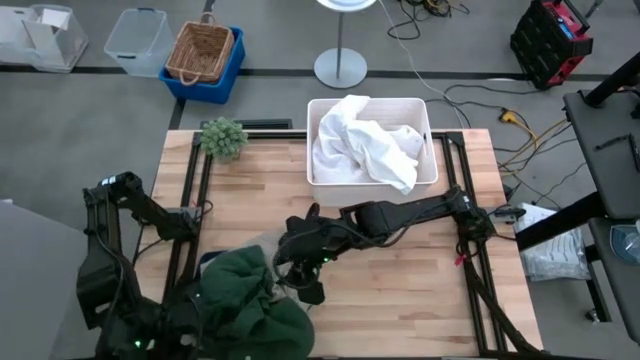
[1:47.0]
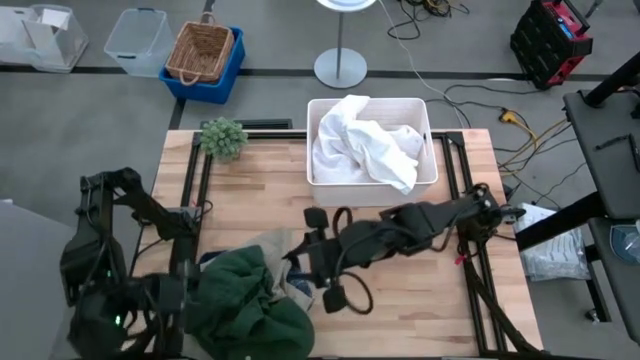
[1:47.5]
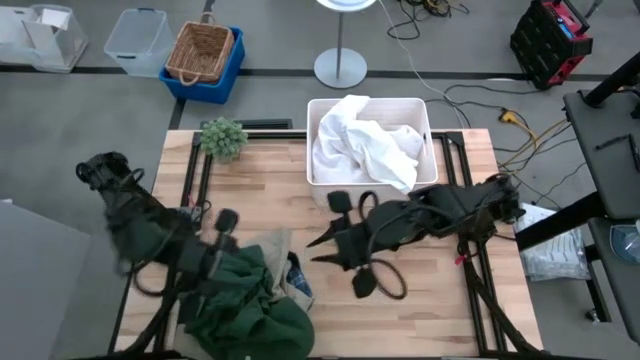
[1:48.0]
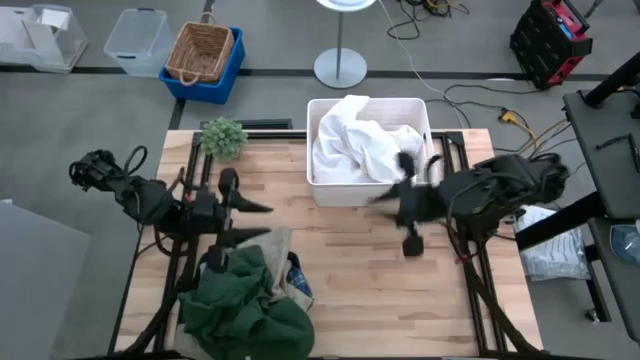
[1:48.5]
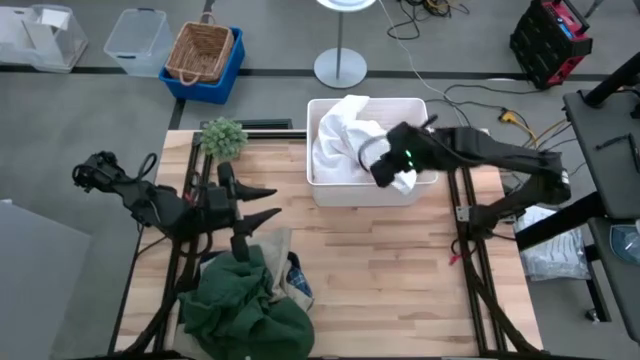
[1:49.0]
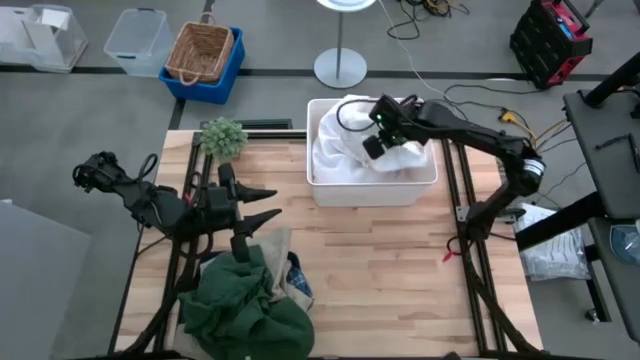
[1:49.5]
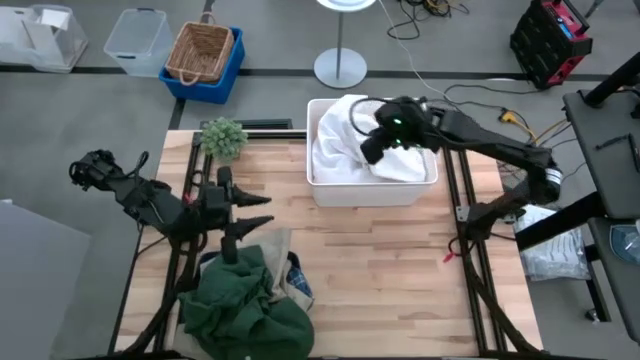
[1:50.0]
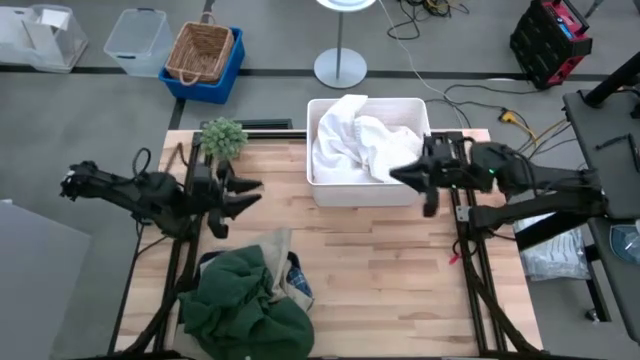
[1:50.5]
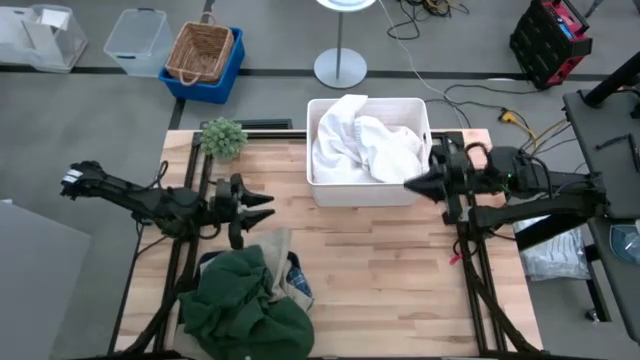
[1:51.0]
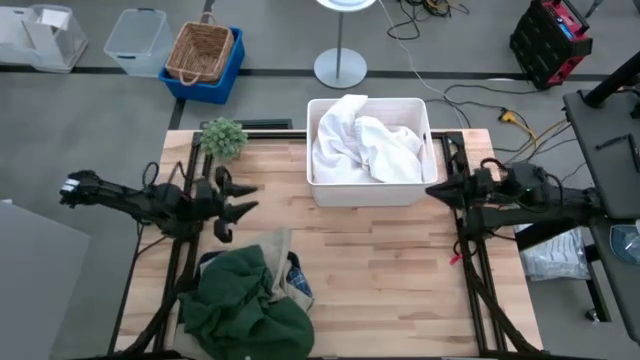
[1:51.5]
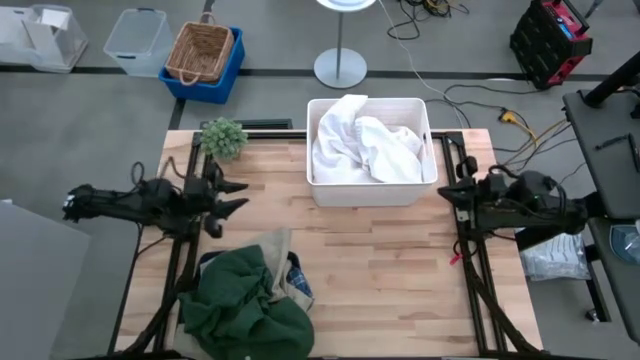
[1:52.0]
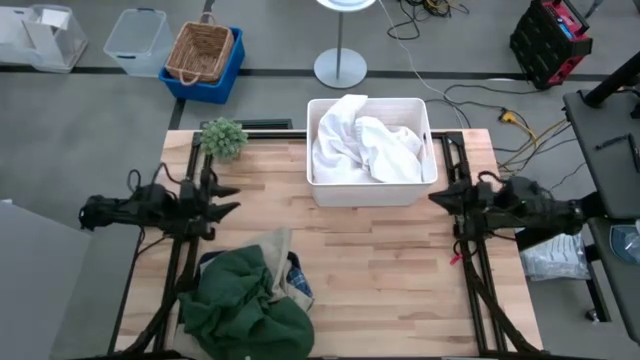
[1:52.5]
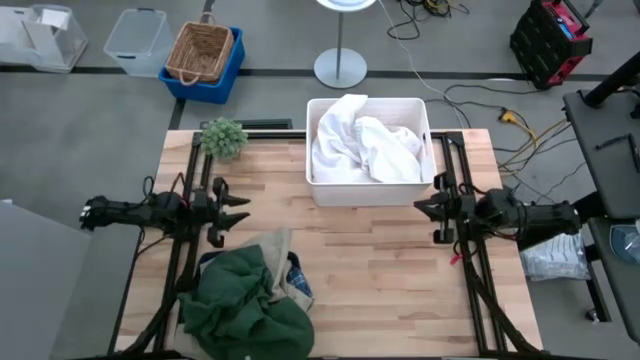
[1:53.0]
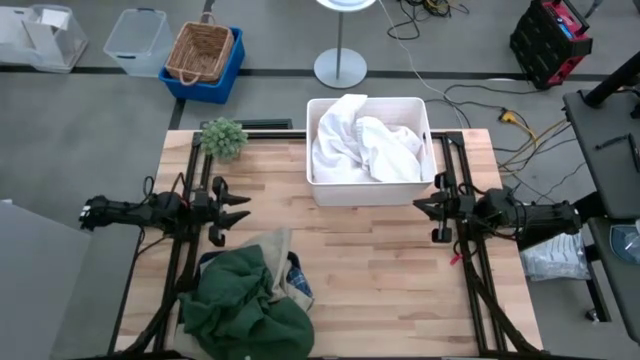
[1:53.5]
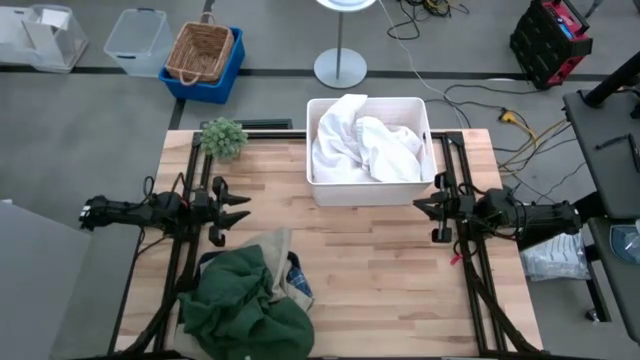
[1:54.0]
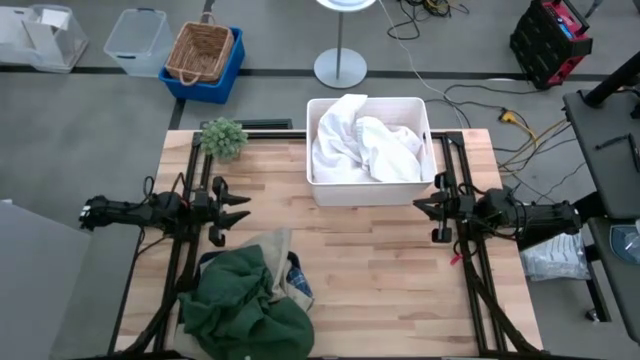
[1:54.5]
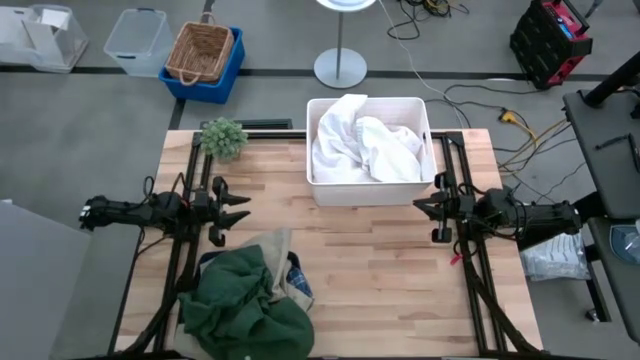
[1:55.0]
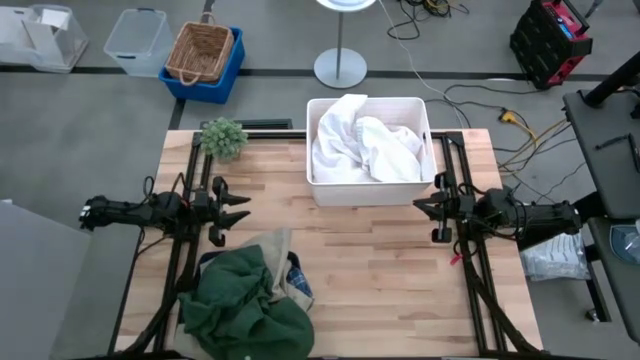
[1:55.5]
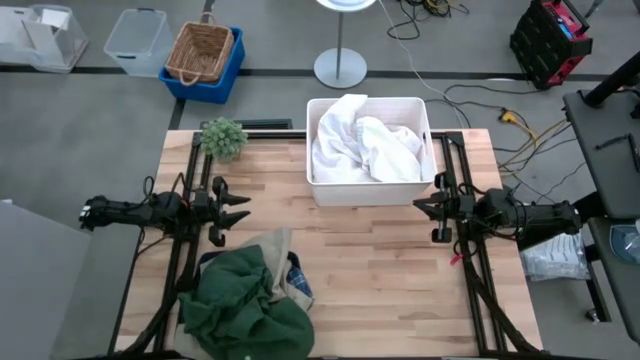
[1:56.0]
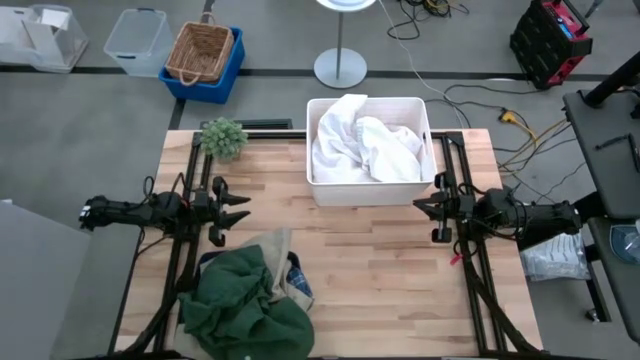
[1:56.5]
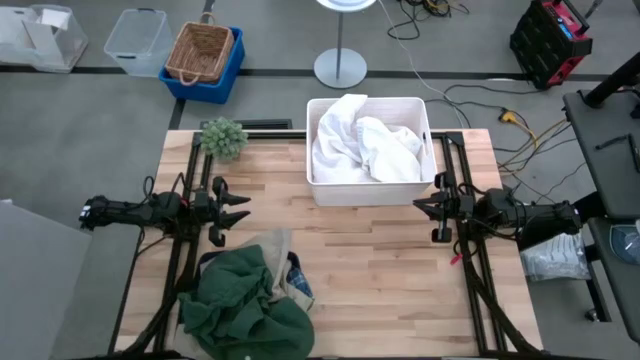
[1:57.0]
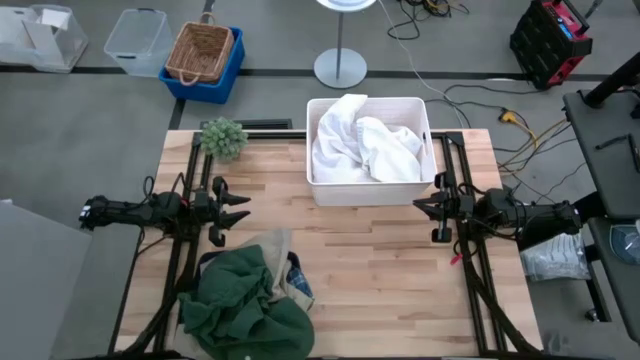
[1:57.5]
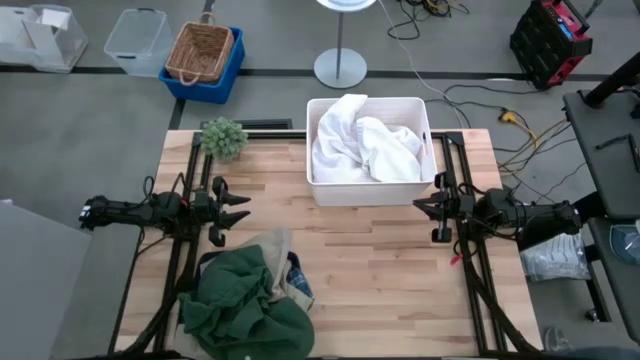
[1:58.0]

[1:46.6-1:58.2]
Task: Sort clothes
Return to Home Position

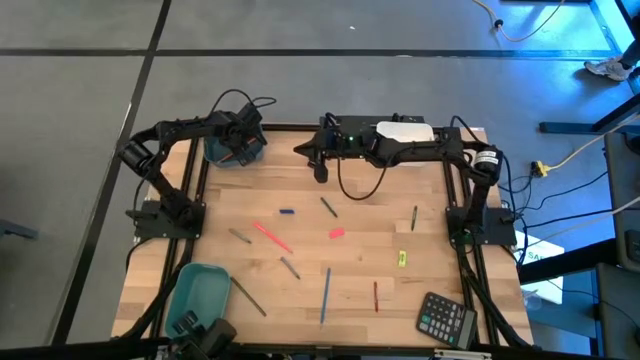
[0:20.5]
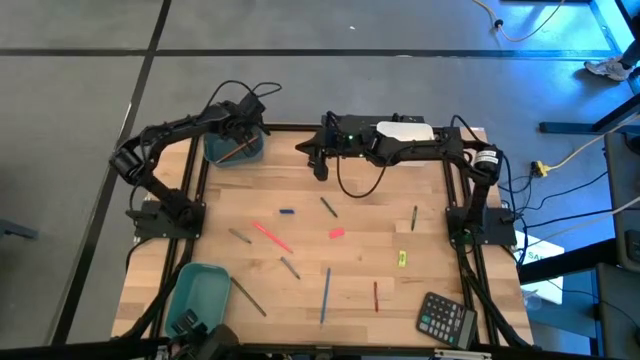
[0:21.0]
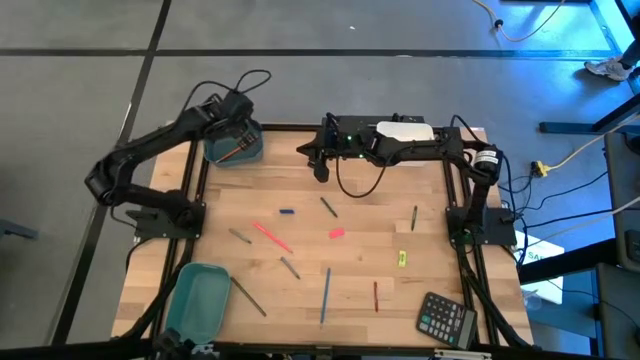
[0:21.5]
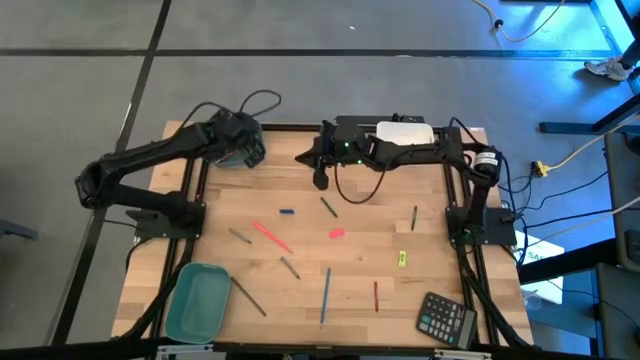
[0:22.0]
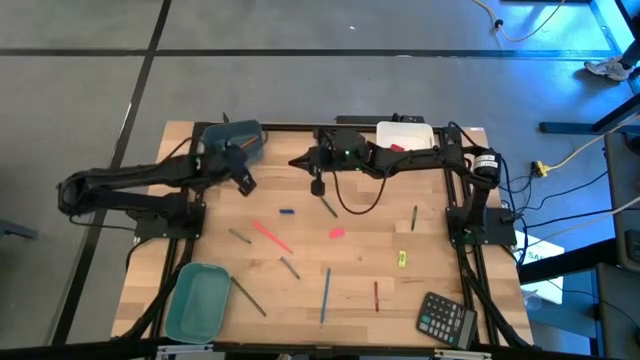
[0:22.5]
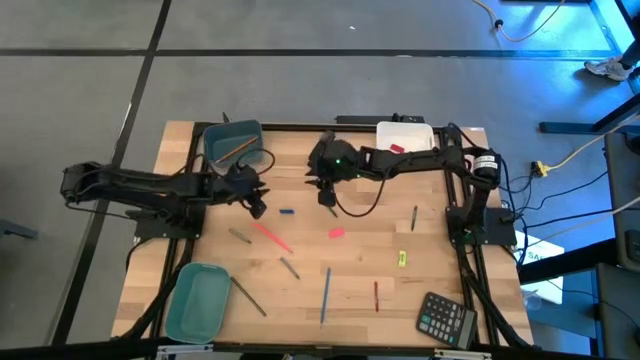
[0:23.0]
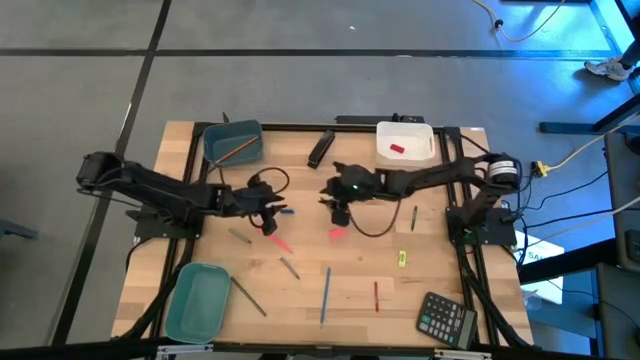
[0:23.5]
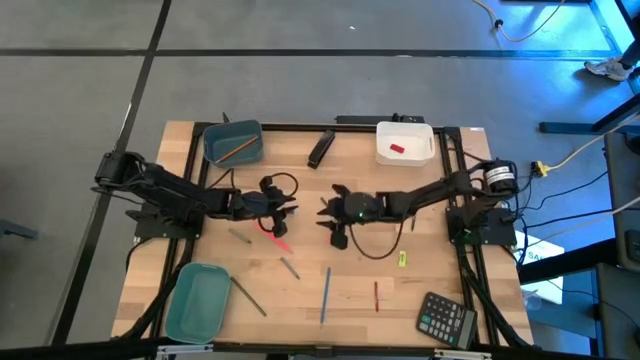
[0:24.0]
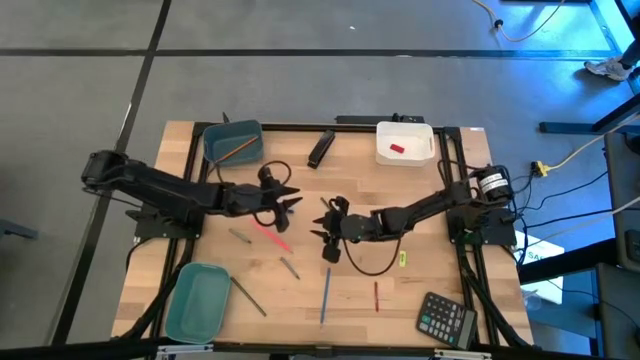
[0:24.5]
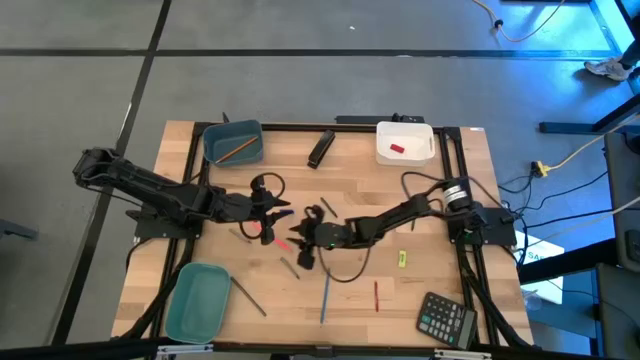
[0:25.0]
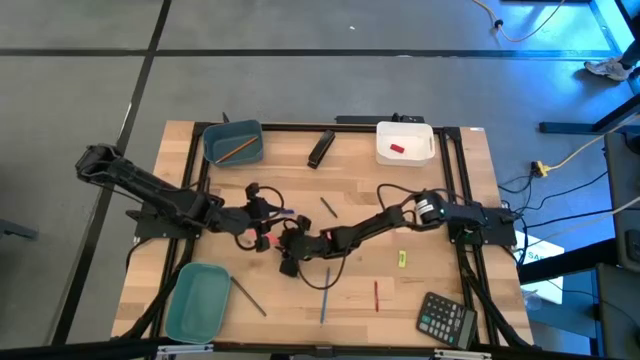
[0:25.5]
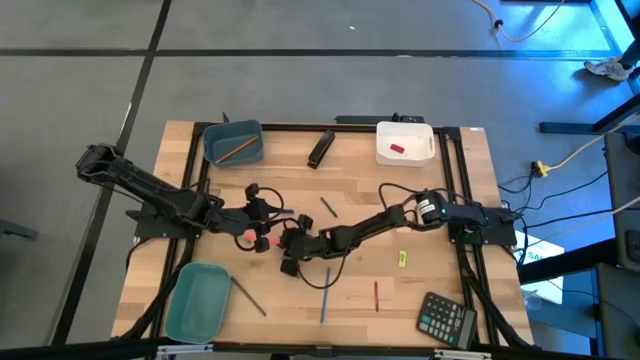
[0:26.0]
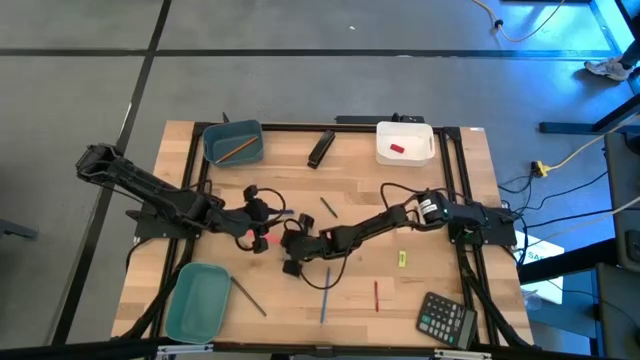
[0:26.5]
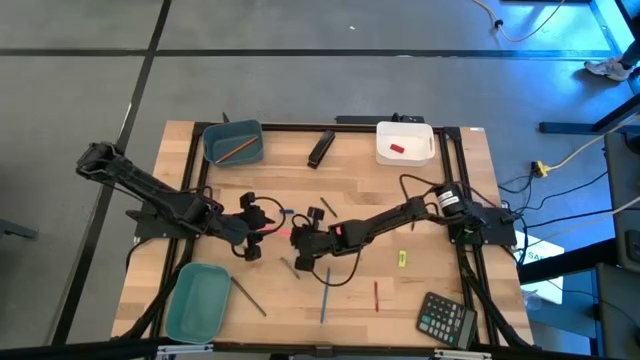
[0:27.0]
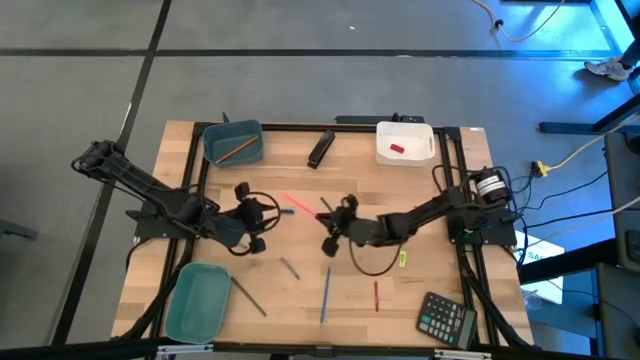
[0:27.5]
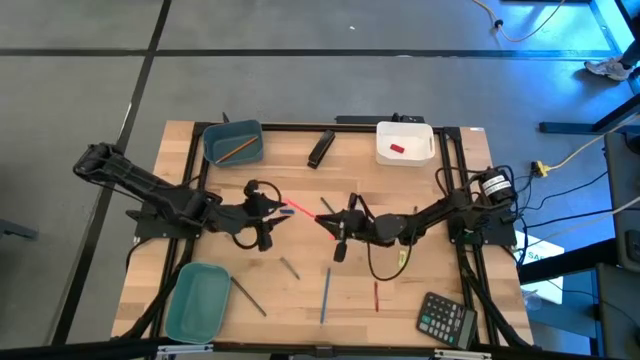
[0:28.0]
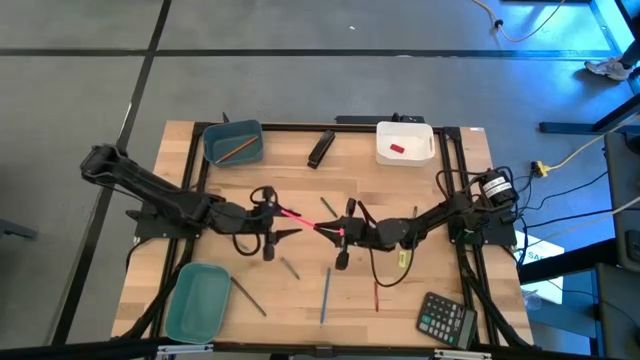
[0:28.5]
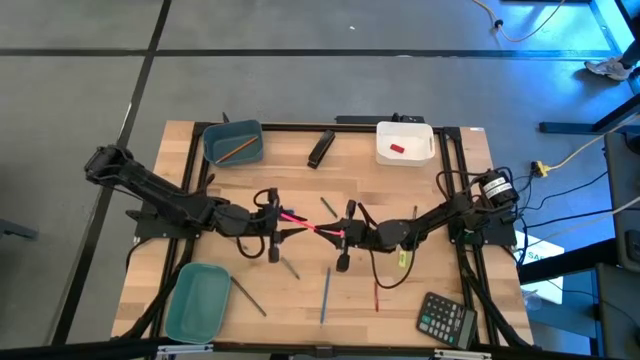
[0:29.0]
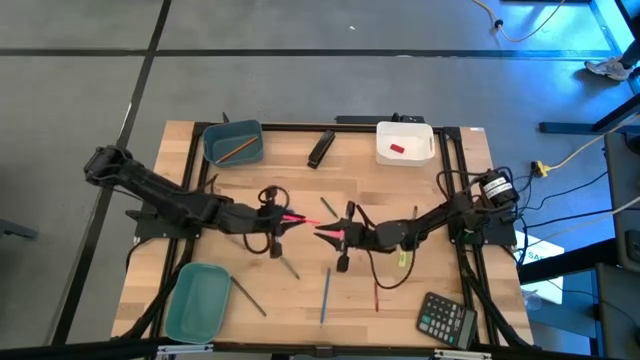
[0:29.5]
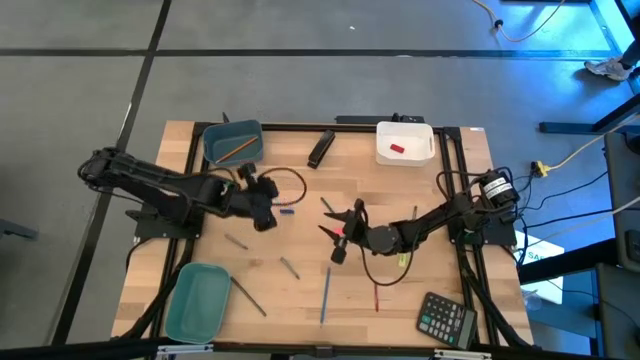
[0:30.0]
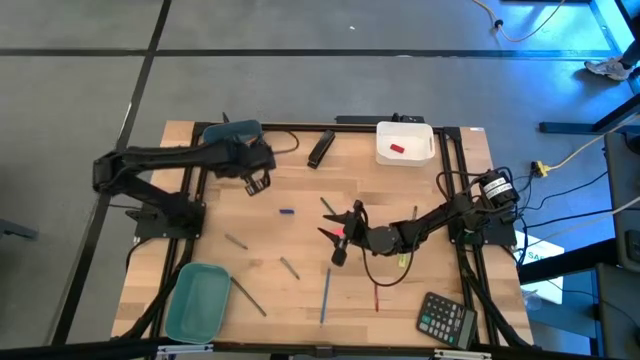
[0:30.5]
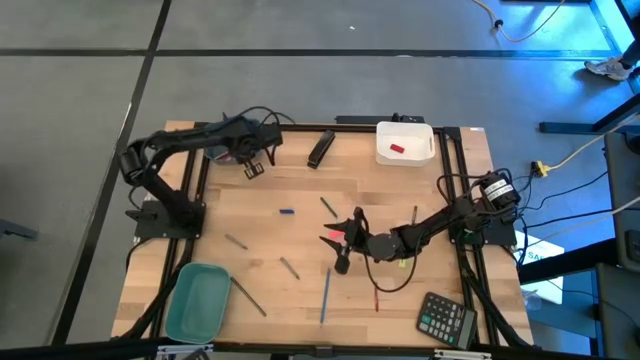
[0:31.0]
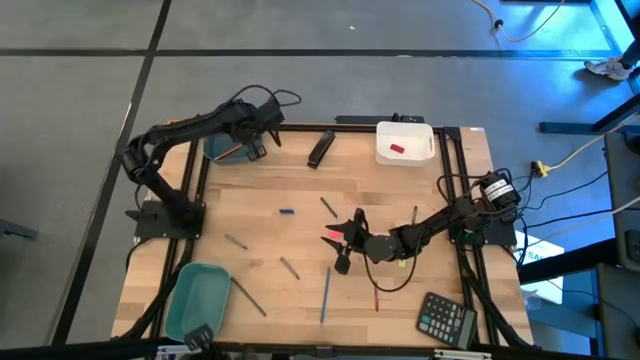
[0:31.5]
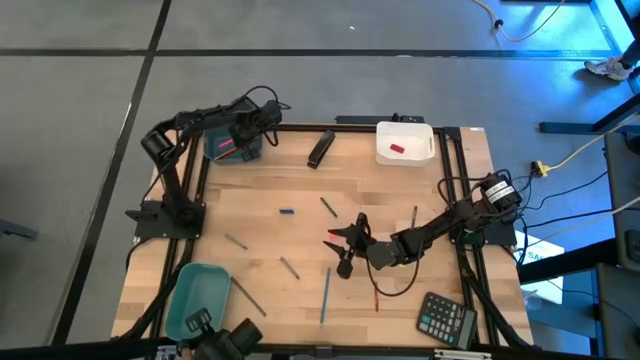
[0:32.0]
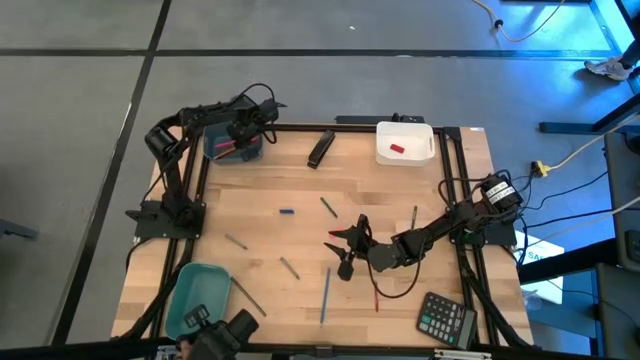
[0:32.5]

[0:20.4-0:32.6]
Task: Sort crayons/erasers/pens/pencils in bins
Put the pink pencil into the blue bin
